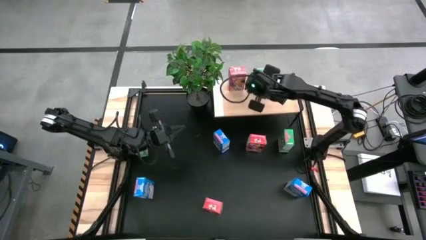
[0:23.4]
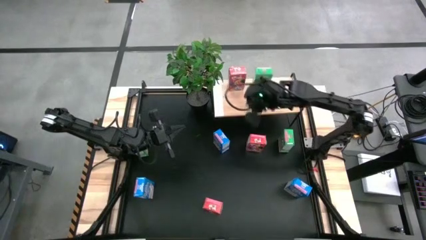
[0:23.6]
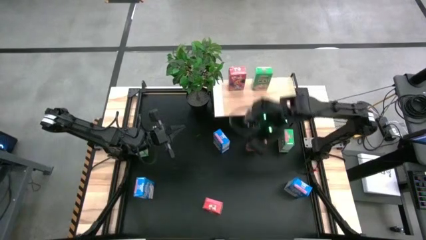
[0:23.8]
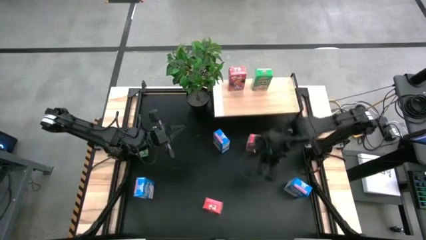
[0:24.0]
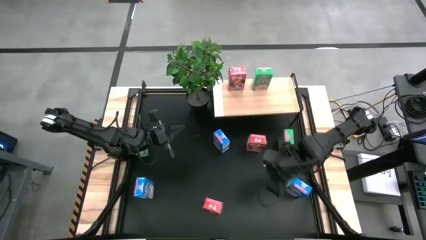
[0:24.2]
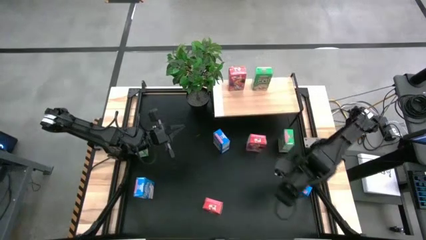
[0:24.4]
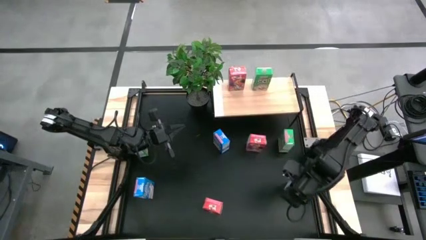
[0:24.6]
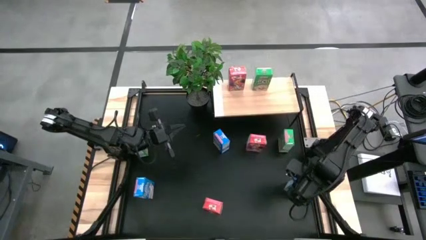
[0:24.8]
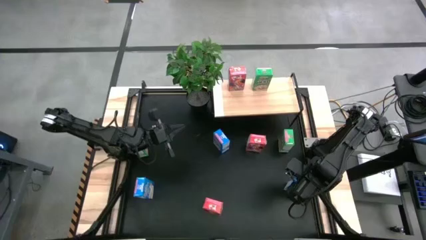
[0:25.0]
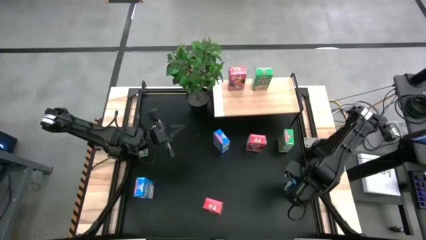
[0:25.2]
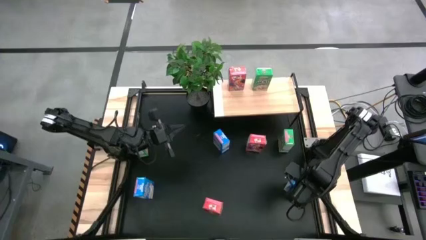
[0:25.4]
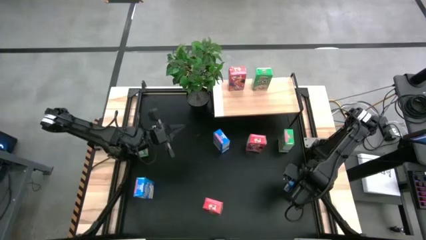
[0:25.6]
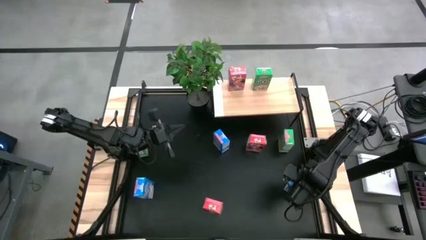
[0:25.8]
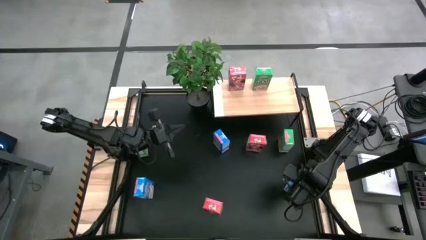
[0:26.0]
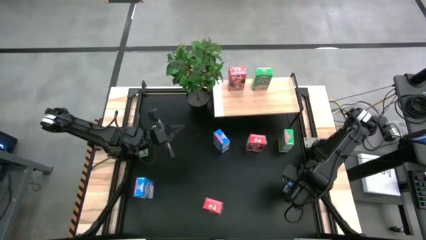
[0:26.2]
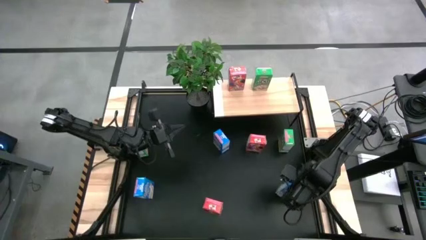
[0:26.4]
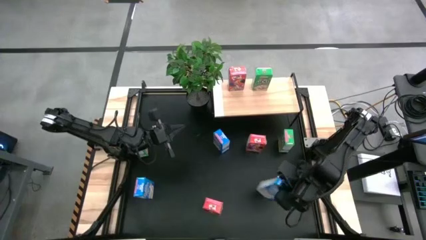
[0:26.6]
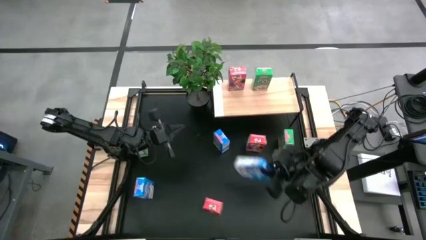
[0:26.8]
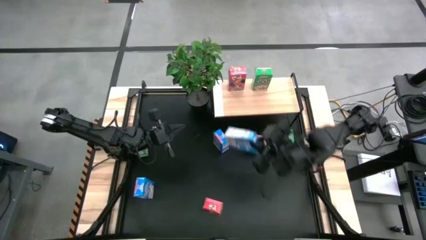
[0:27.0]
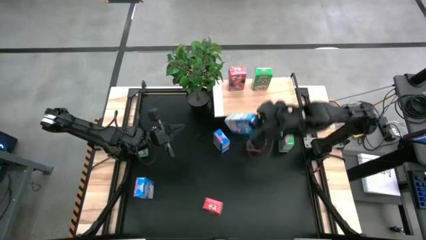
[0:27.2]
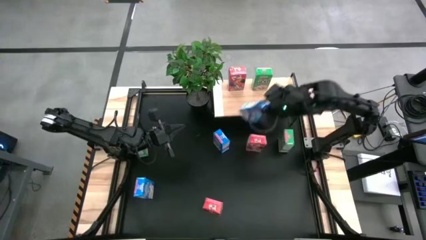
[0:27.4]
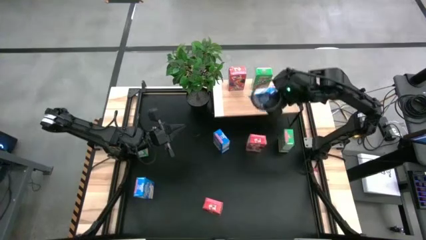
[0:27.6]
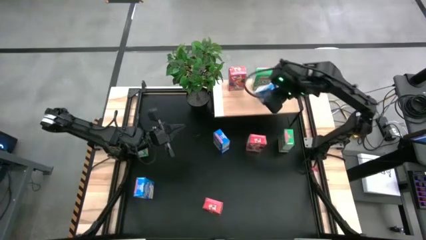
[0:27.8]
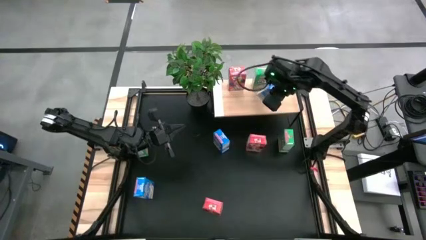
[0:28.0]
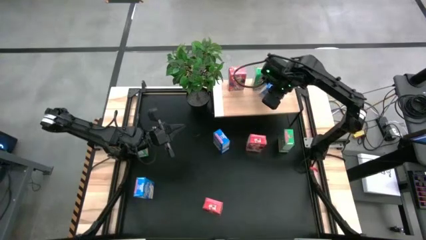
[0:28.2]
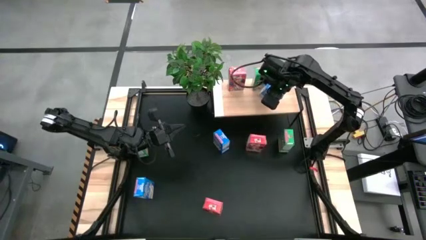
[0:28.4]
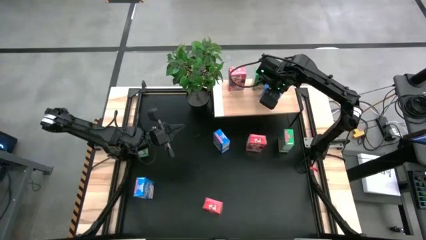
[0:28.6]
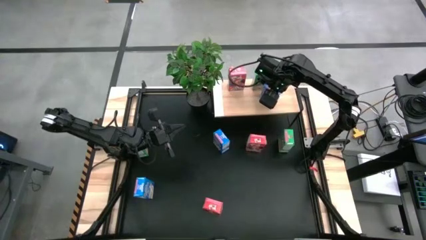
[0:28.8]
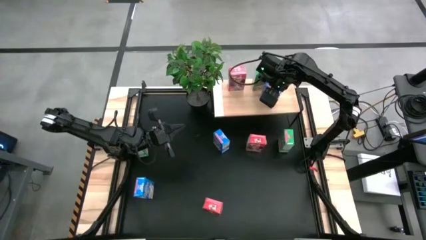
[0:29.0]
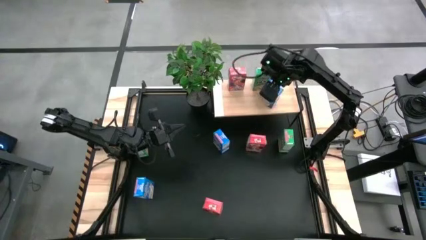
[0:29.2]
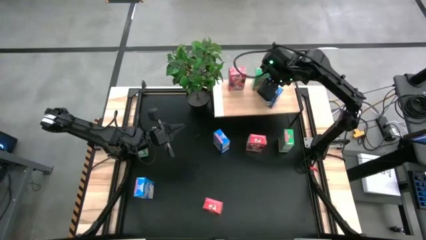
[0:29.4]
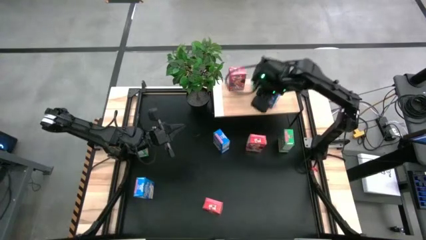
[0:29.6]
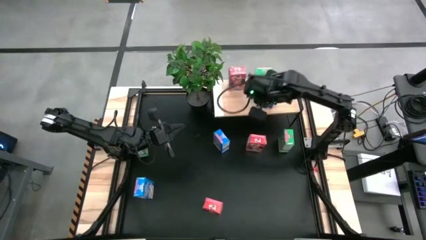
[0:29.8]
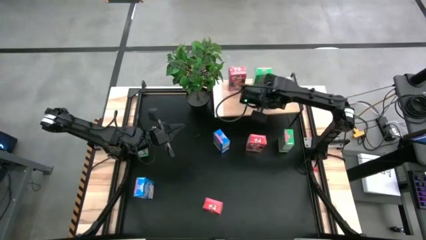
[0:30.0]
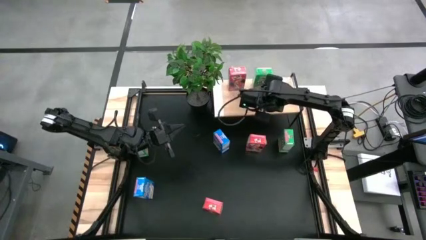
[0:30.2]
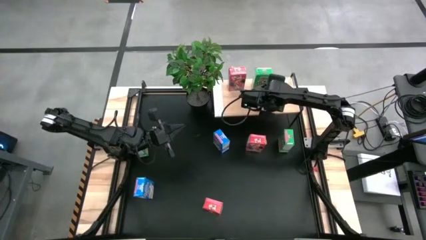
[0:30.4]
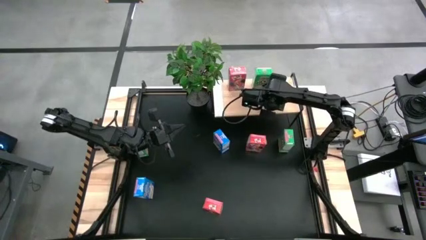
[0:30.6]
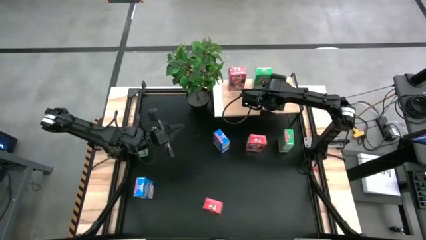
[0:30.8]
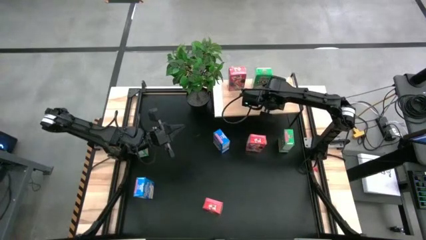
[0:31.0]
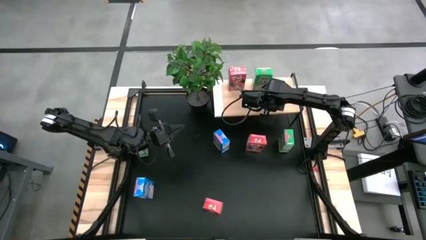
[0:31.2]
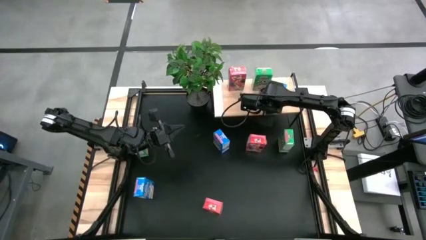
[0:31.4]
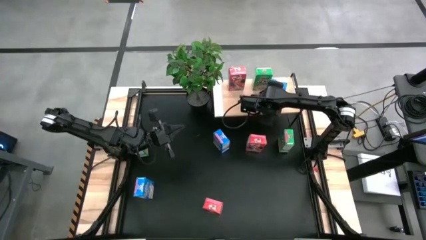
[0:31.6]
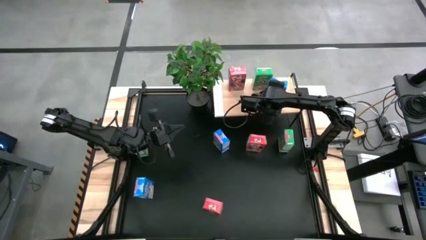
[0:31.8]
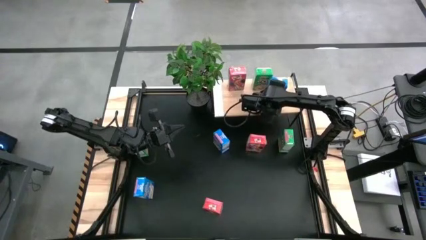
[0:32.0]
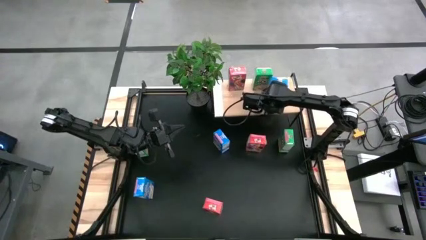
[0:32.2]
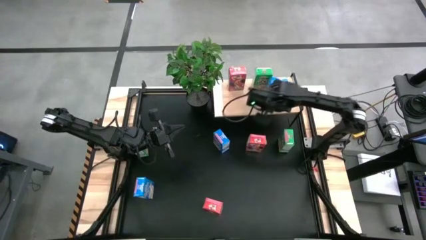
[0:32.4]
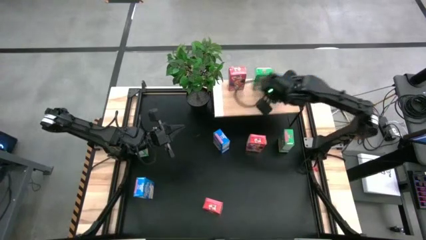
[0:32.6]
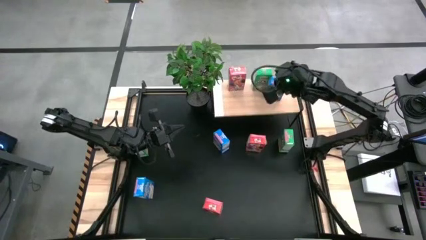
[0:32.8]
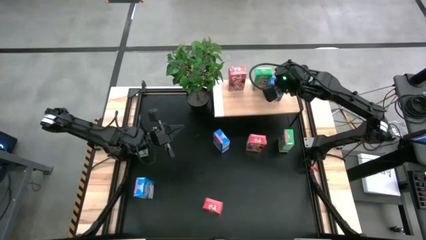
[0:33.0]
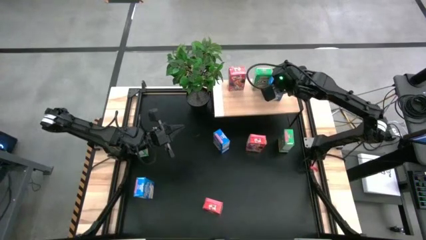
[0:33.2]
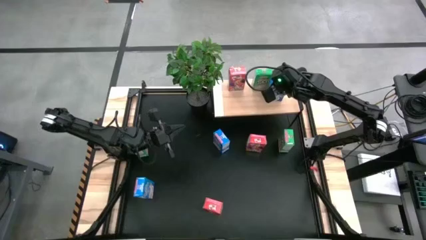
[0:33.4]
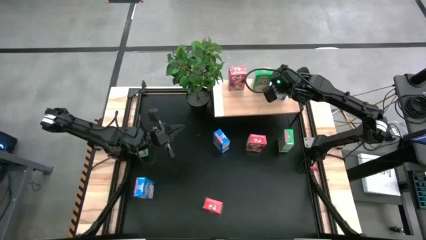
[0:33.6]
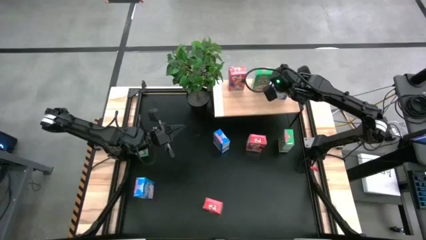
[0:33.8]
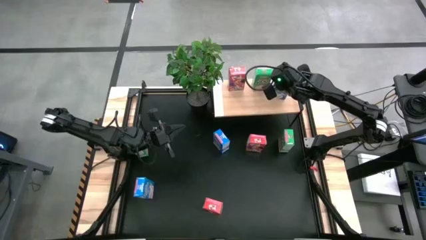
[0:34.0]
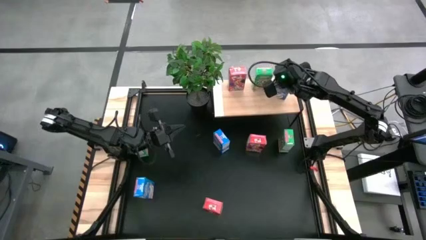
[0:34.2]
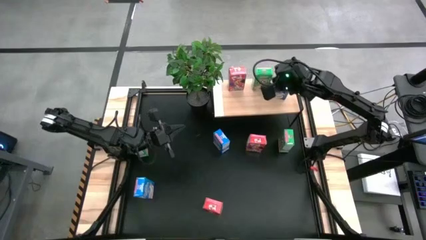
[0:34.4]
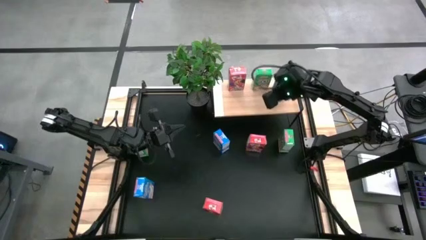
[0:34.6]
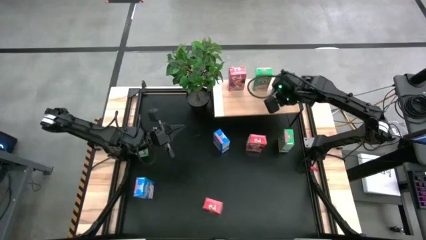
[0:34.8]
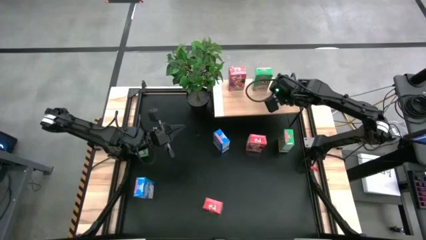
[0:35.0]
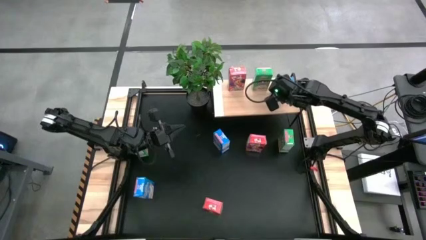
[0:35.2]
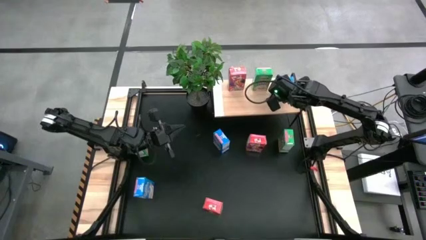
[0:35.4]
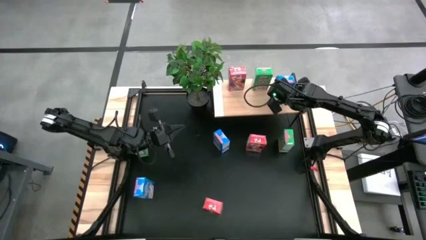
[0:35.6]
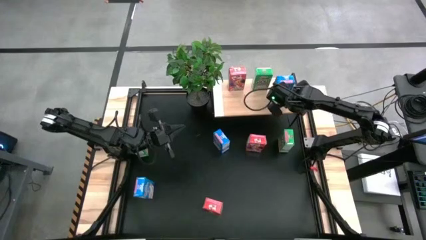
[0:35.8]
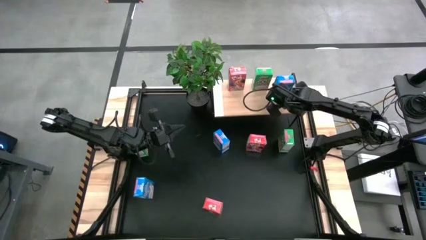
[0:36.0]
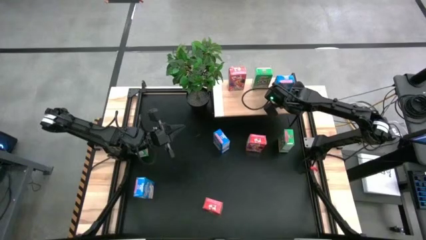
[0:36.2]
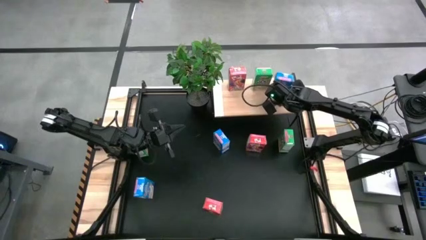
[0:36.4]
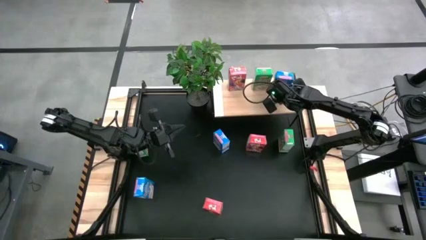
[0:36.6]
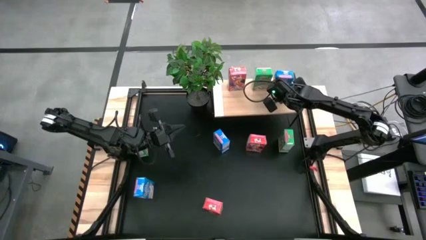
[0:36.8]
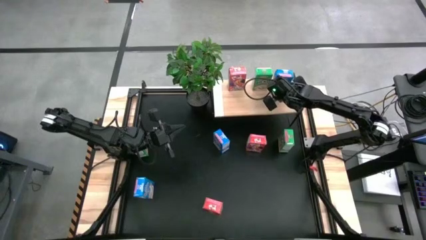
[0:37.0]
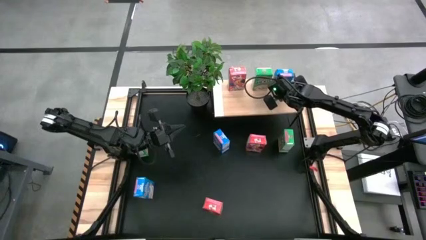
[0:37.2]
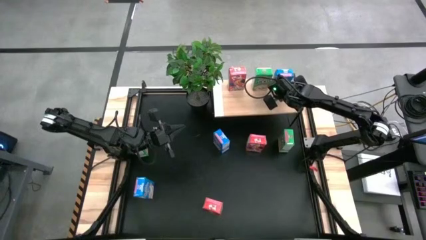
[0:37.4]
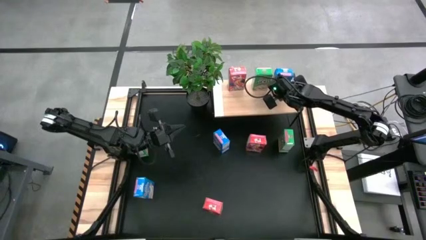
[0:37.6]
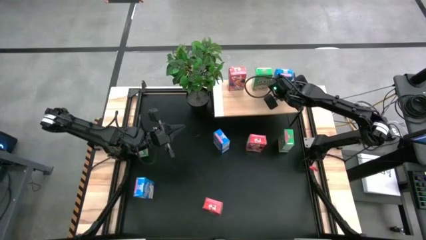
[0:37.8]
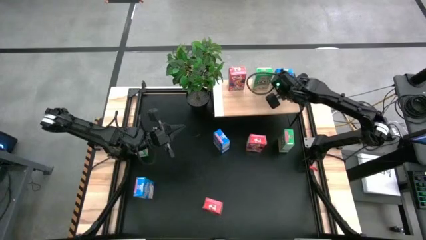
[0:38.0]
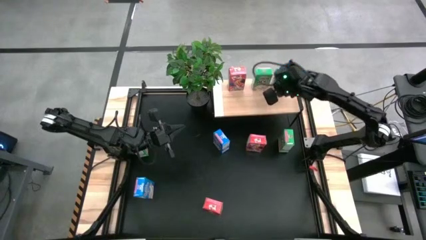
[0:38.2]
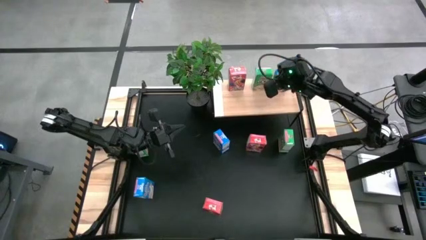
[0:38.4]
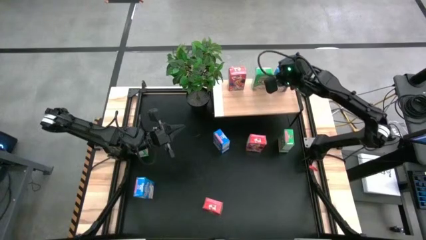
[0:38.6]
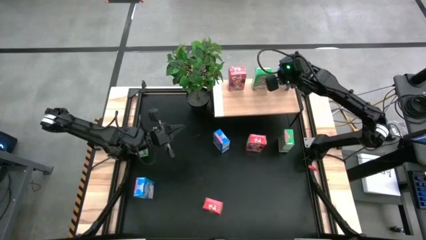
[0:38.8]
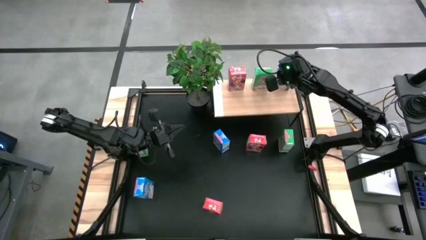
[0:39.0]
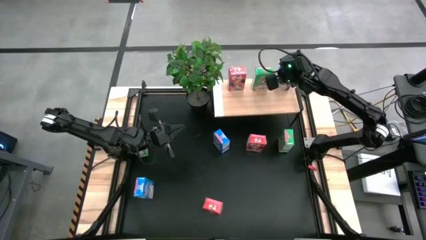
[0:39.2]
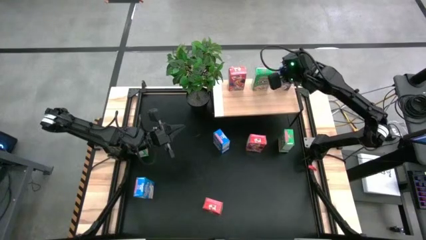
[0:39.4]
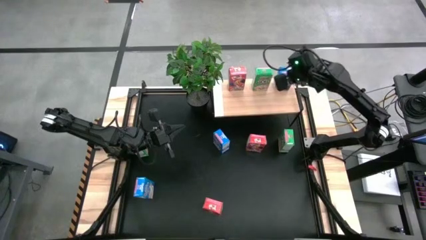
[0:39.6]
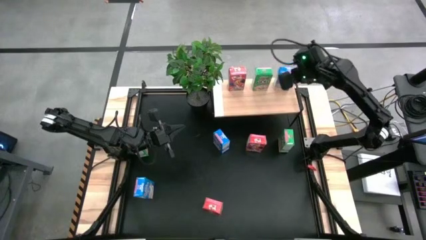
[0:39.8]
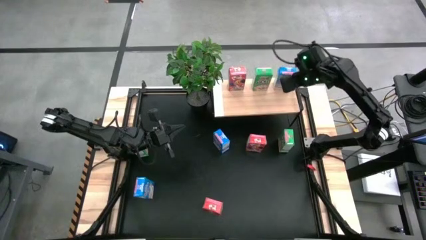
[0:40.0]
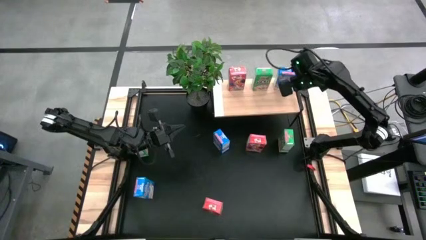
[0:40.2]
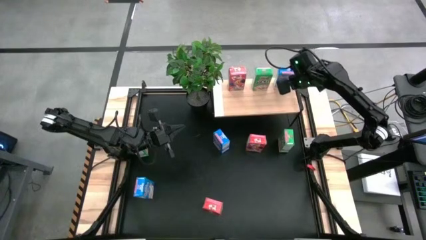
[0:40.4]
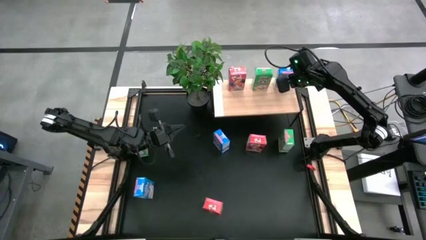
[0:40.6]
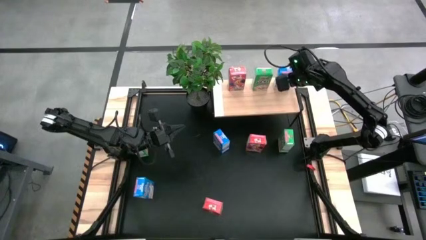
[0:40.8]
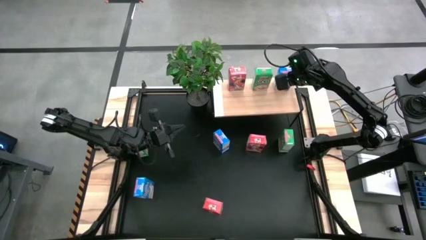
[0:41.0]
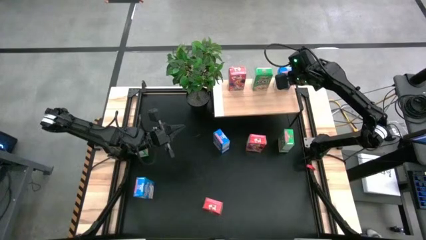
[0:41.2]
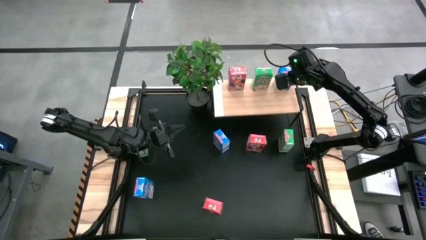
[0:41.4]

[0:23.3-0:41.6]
Task: Stack cereal on shelf
Put the bottom right blue cereal box on the shelf
